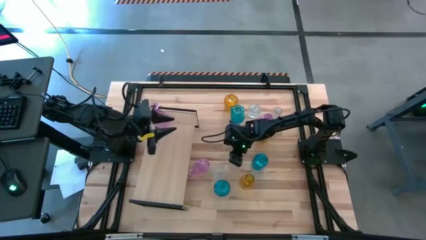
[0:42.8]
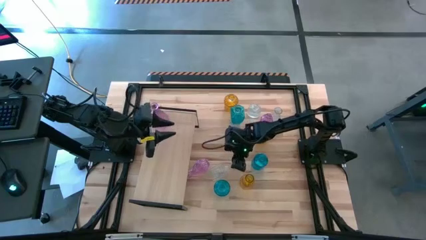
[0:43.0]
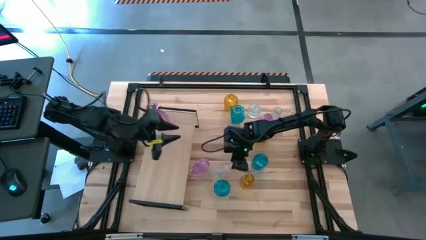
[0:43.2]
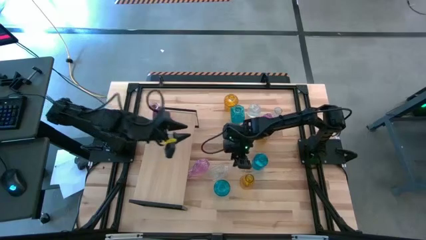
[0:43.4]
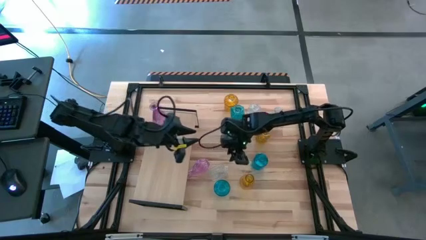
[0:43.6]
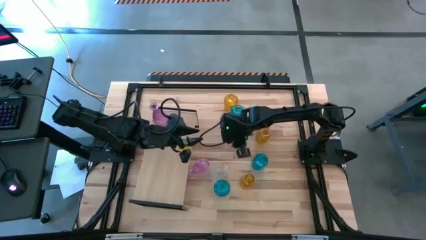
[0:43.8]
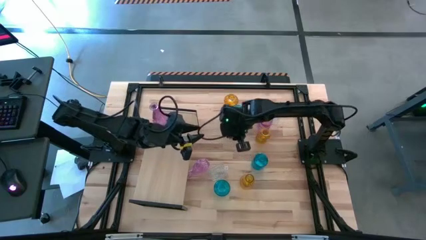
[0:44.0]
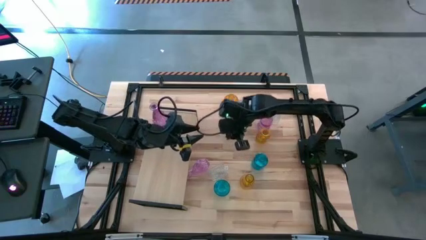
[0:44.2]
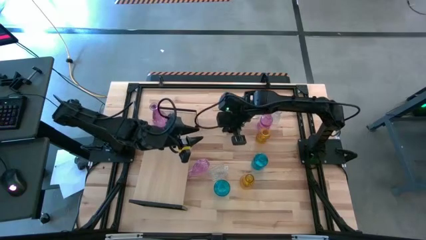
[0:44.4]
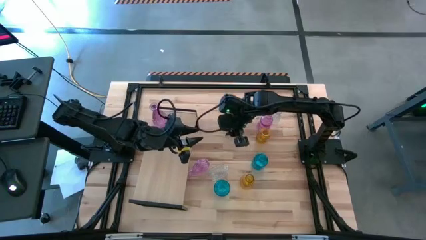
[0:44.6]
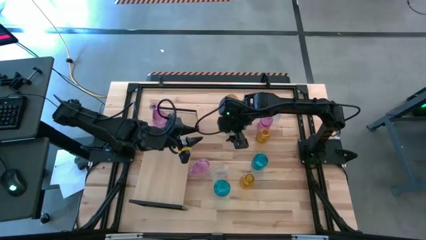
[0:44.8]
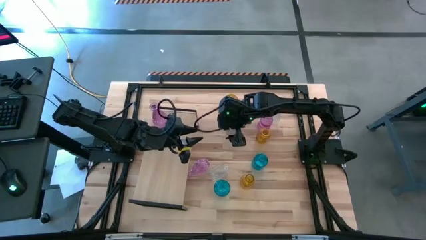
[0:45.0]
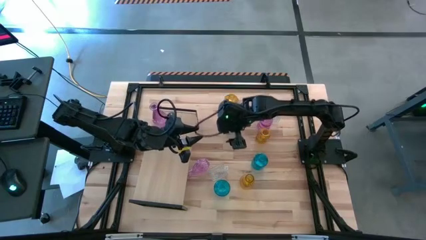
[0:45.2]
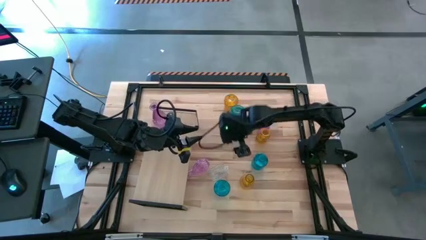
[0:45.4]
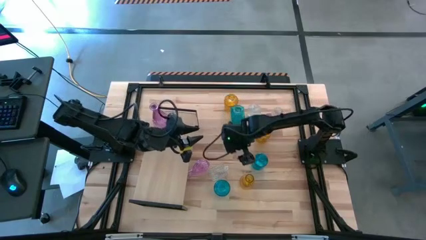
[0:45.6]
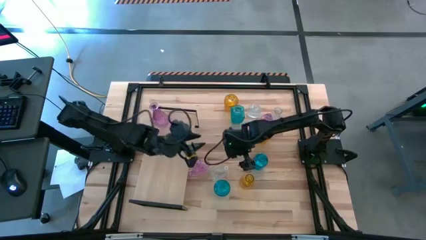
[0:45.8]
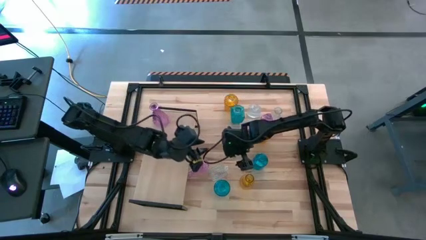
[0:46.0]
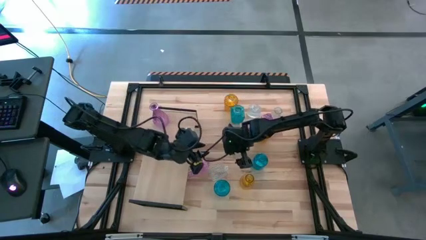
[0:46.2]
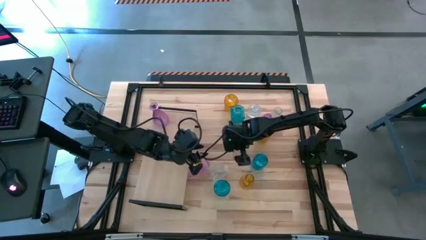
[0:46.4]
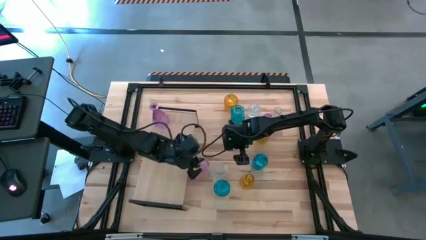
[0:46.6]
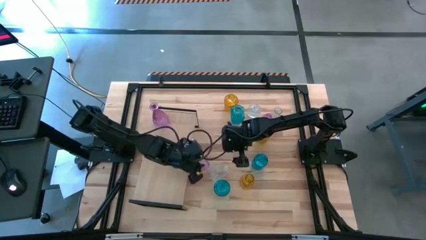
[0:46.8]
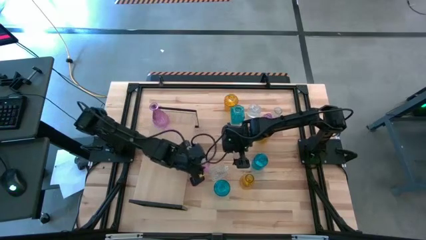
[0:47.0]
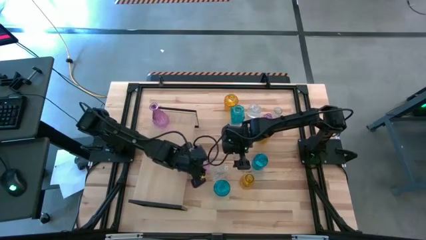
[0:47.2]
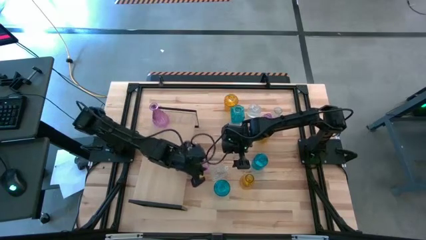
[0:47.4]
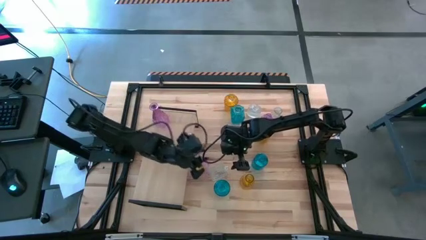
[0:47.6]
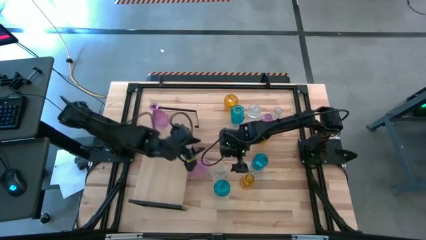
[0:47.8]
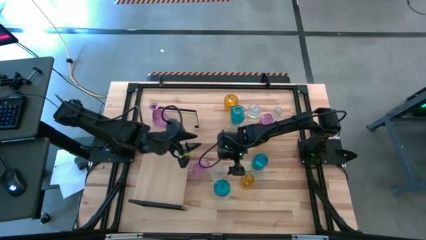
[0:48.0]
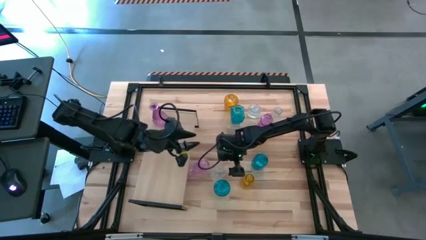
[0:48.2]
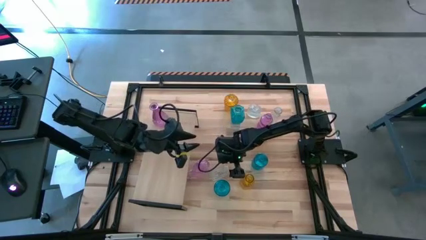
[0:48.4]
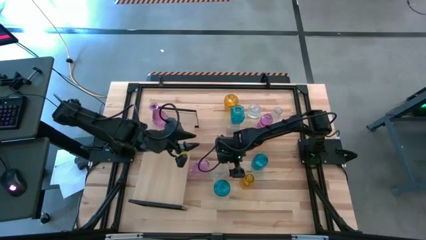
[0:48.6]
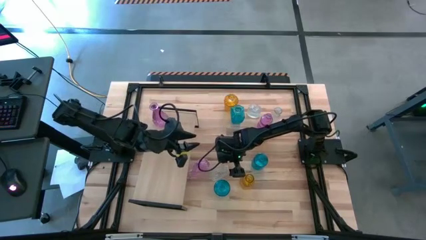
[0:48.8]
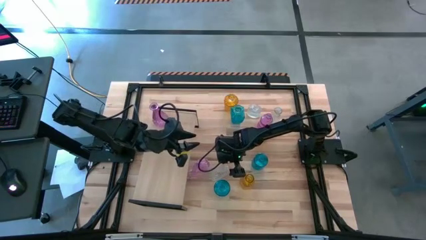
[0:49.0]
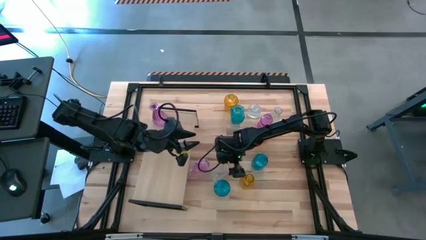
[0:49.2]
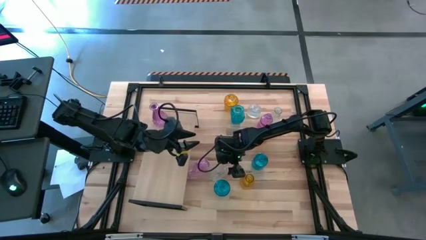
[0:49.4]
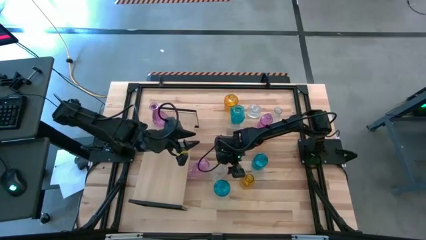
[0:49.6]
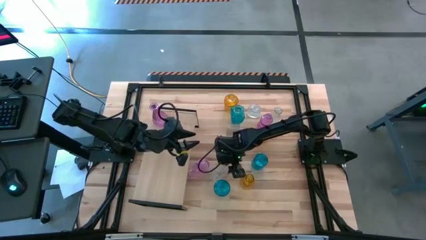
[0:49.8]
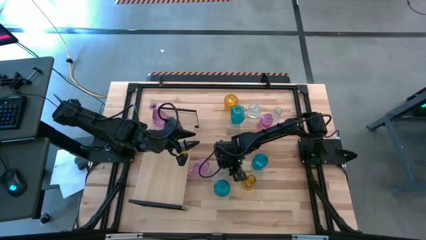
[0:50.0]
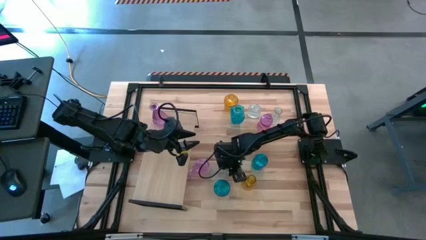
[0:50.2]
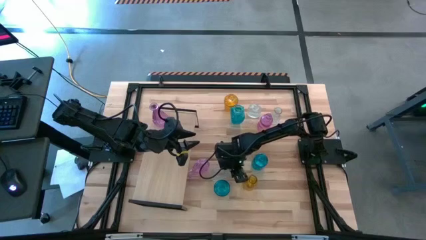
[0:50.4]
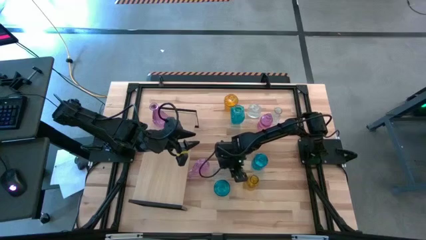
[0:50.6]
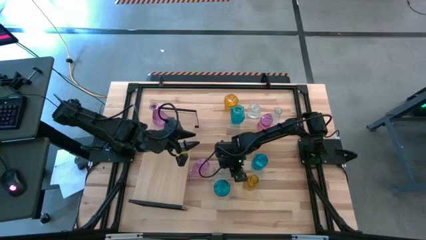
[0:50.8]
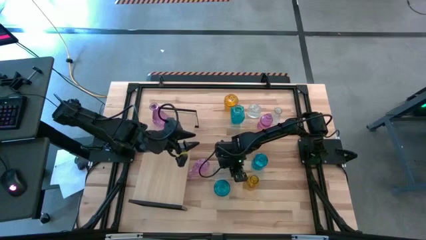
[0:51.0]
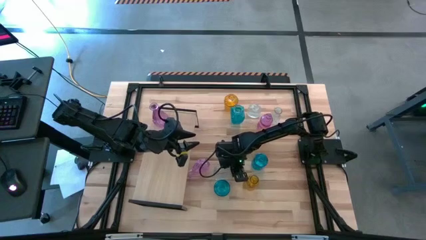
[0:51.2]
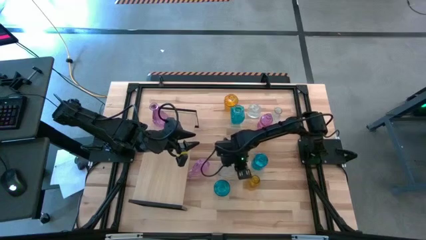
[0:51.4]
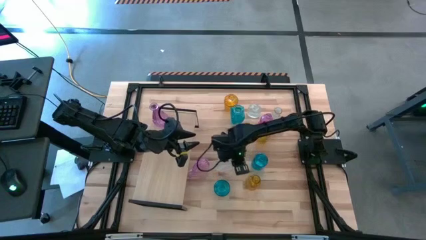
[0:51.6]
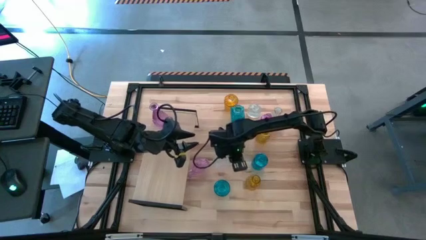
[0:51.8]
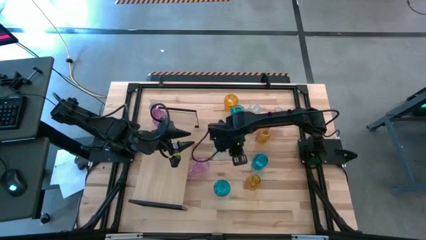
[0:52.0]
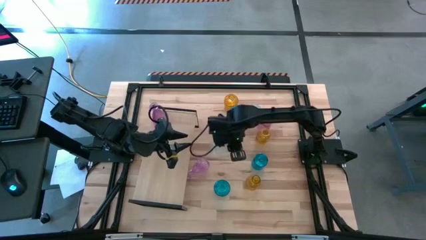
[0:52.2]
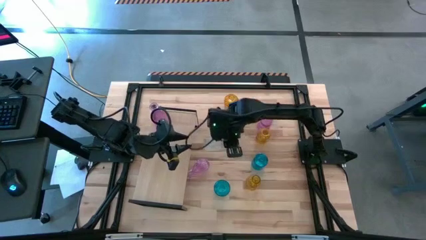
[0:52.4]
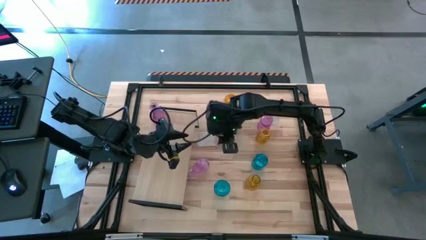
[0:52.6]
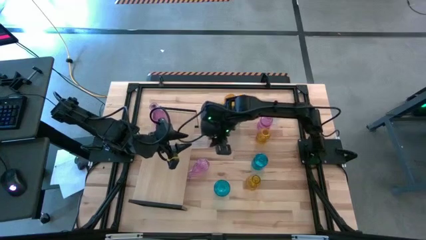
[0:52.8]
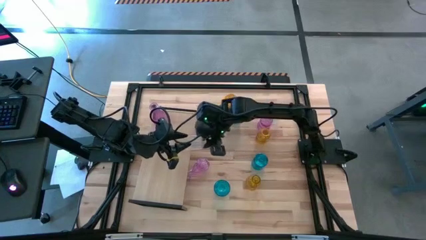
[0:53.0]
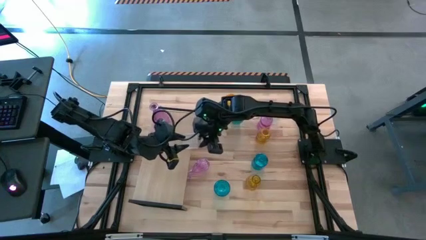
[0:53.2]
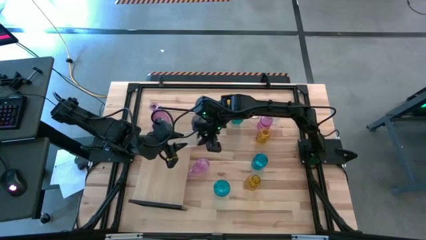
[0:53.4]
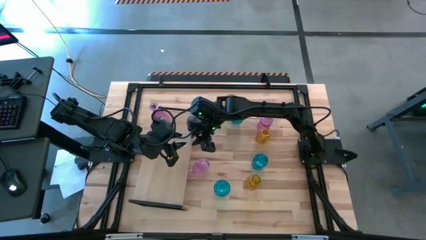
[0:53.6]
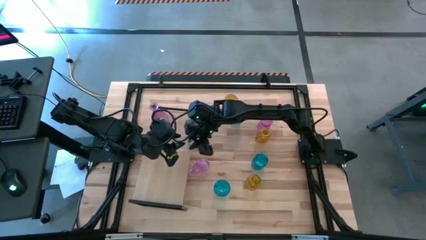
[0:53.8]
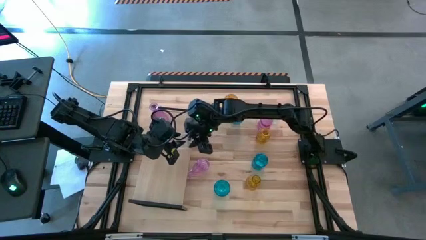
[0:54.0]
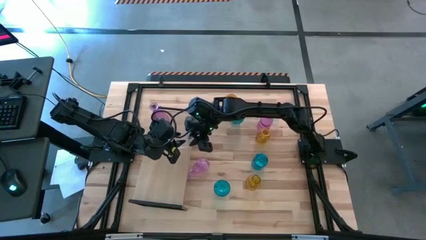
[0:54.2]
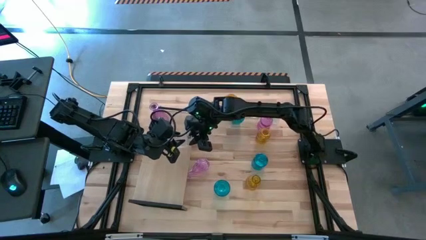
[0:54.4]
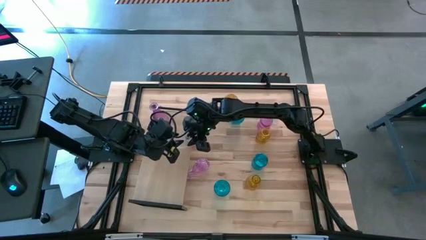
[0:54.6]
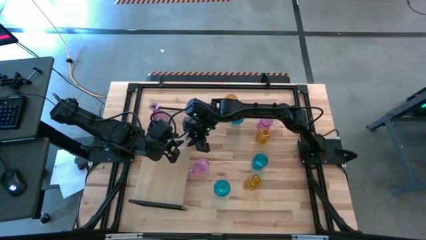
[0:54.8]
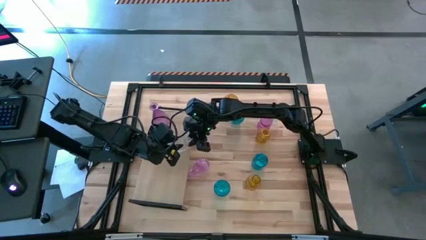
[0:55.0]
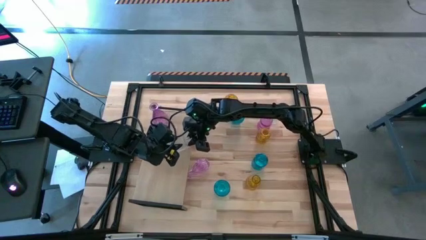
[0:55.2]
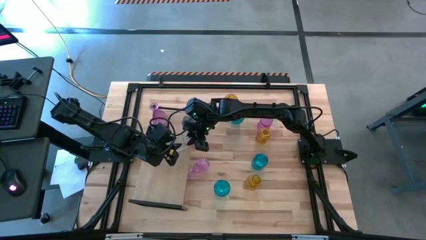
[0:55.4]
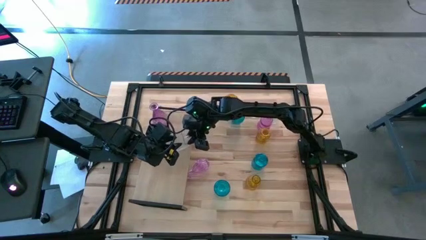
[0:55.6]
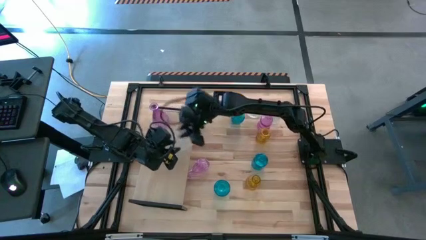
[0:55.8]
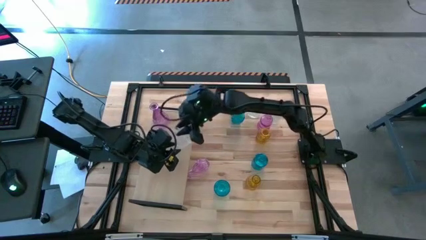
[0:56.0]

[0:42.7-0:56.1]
Task: sort vases onto shelf
Put the bottom left transparent flower vase on the shelf
